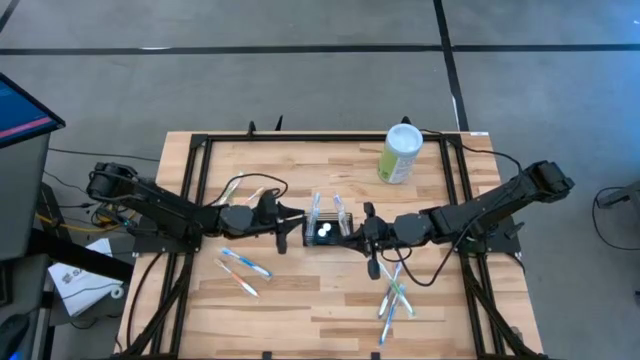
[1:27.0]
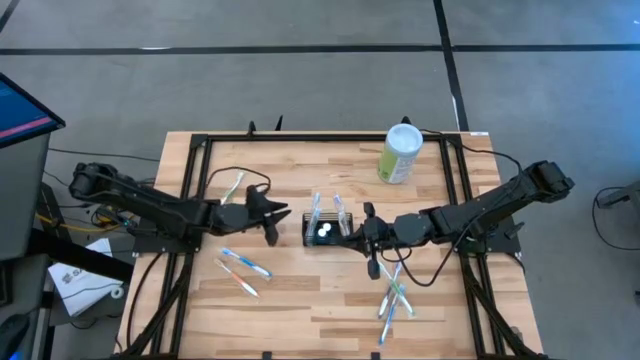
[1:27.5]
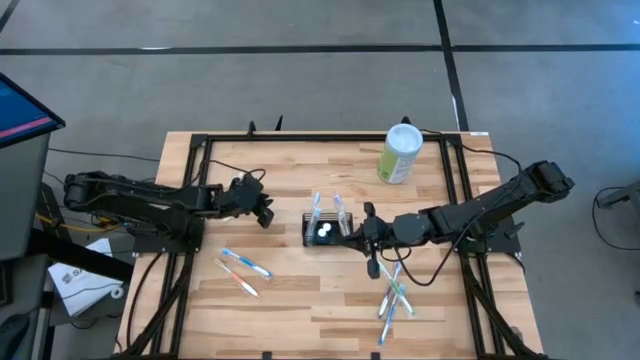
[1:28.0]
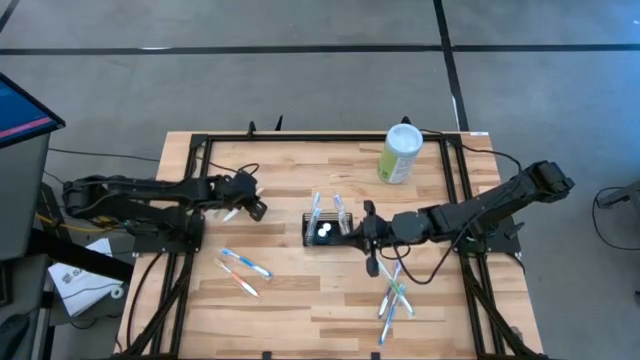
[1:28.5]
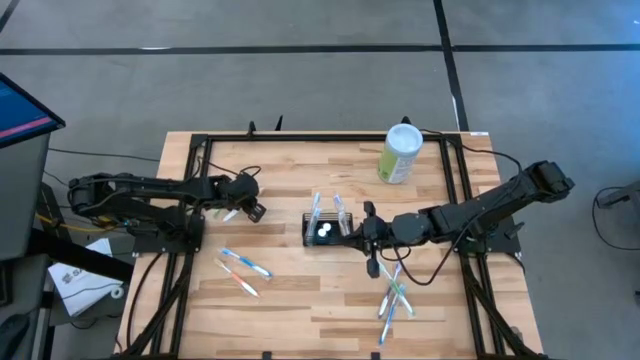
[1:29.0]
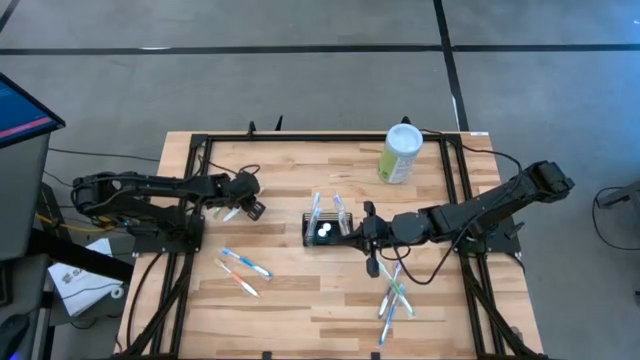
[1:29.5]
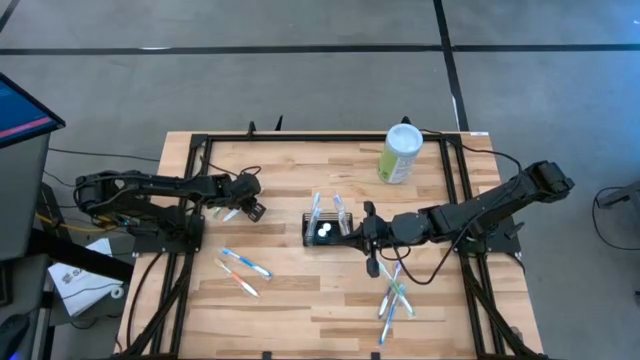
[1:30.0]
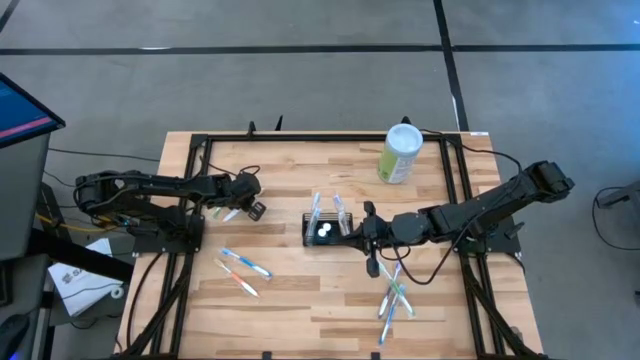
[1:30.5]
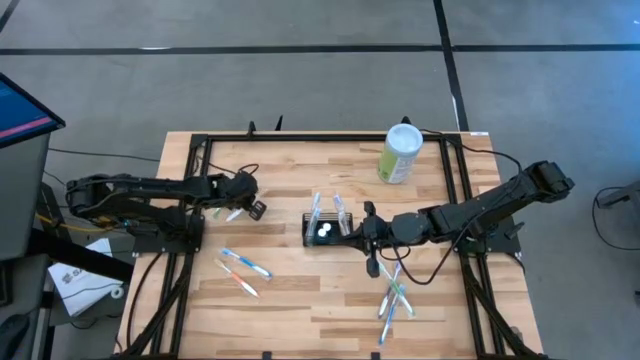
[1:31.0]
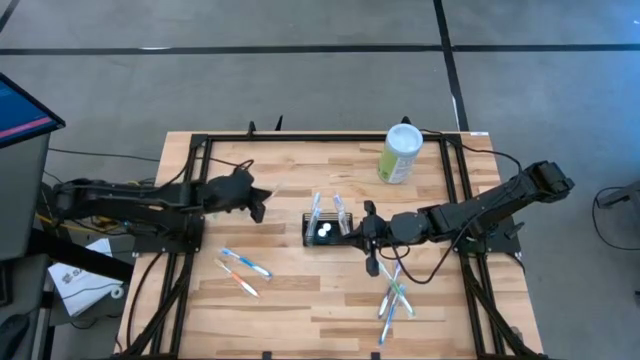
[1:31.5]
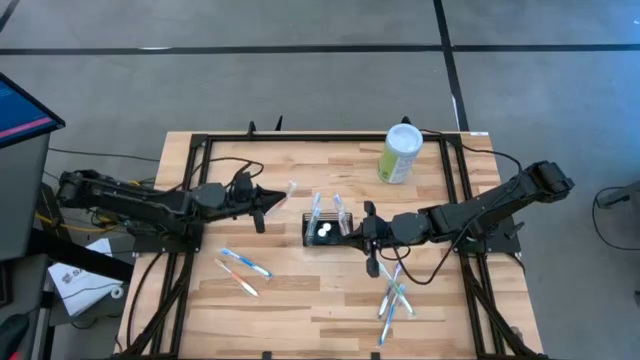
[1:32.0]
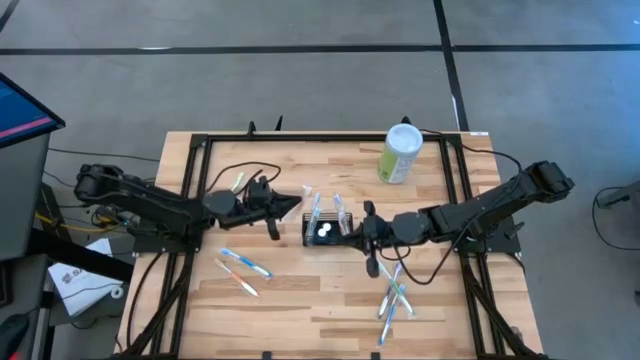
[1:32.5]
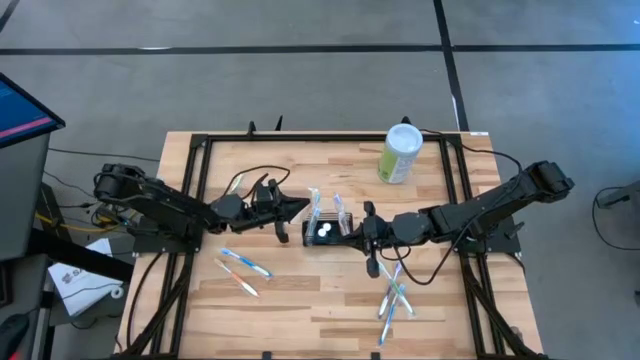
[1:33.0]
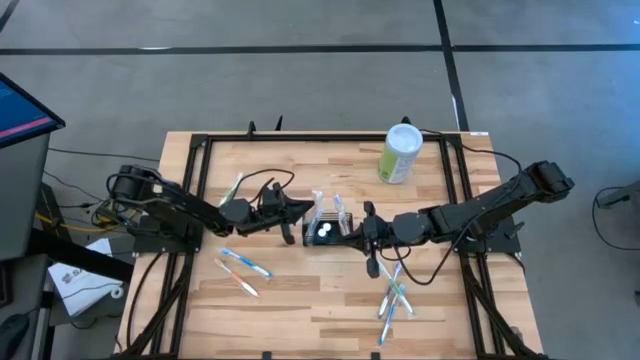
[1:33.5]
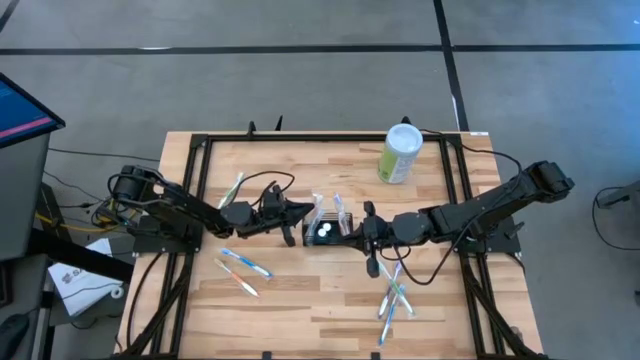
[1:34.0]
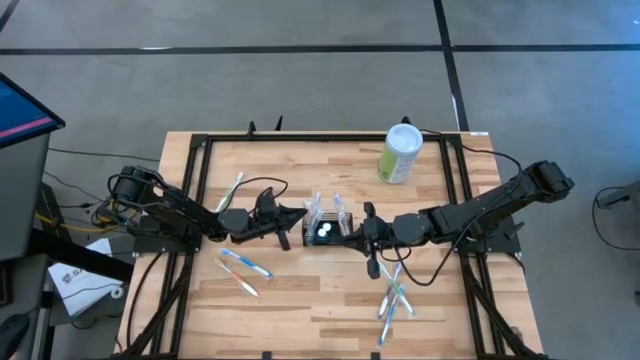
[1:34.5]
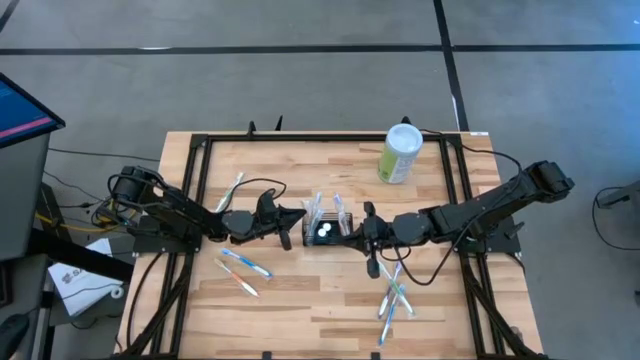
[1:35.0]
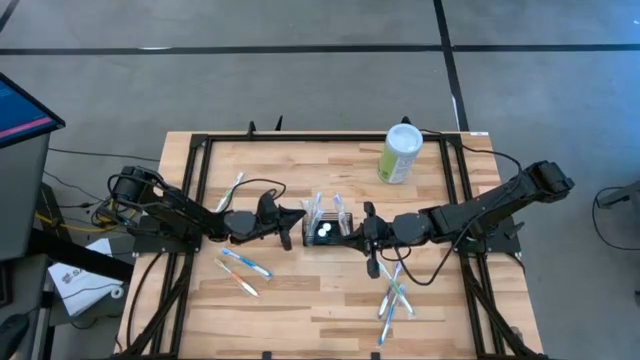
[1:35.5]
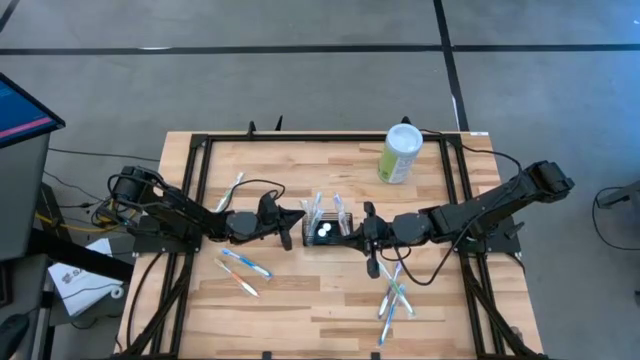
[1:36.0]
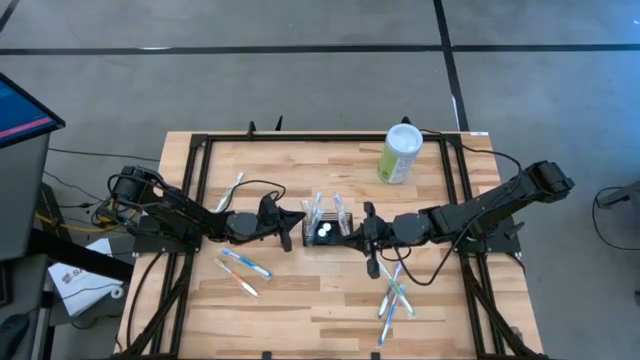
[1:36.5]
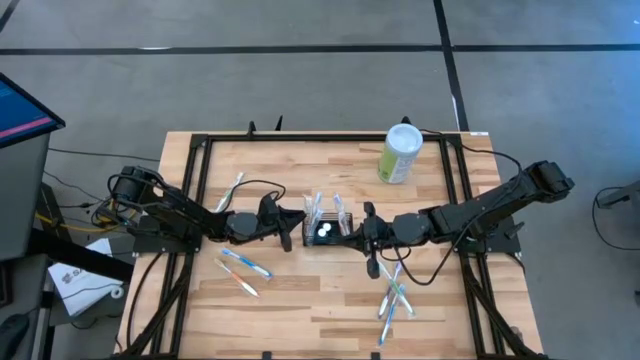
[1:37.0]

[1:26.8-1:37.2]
Task: Pick & Place toothbrushing station
Put the top orange toothbrush into the left compartment of the organizer

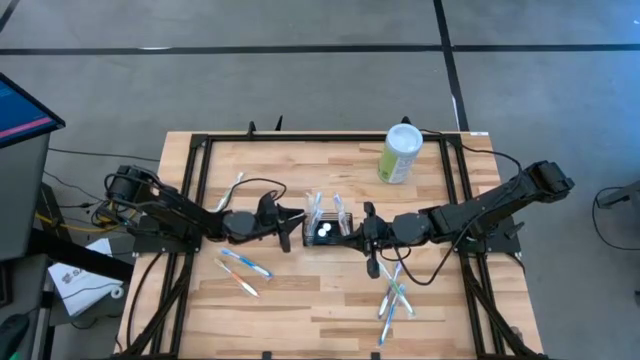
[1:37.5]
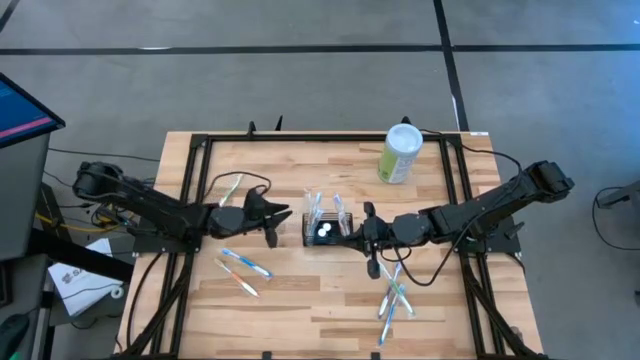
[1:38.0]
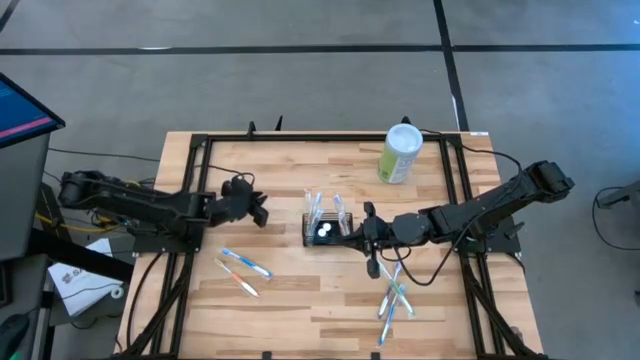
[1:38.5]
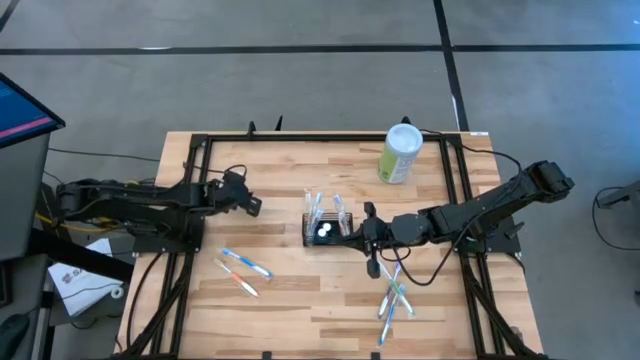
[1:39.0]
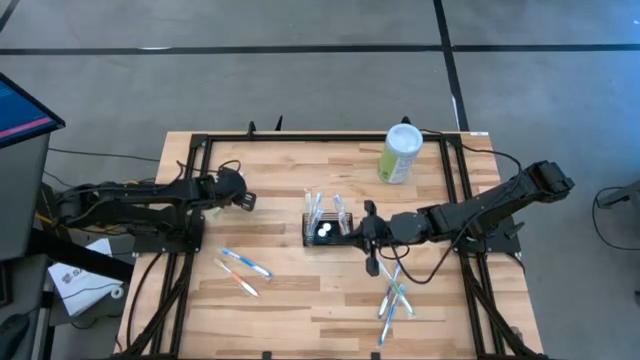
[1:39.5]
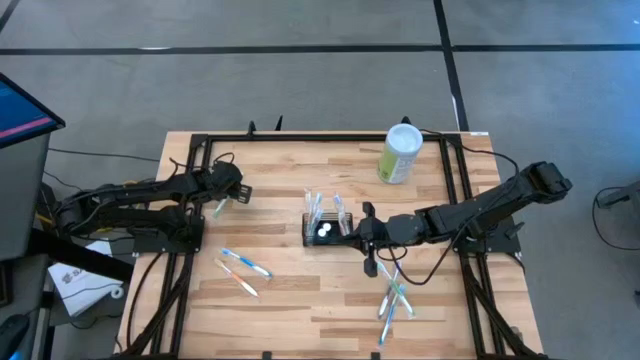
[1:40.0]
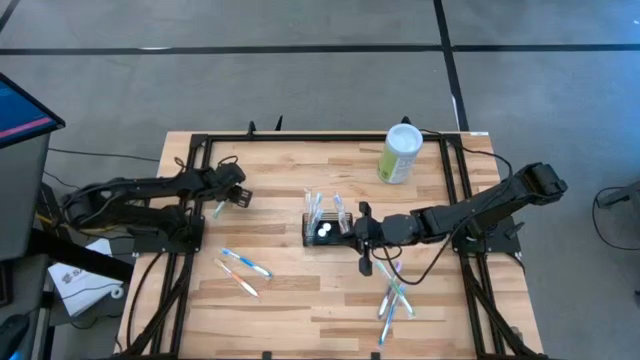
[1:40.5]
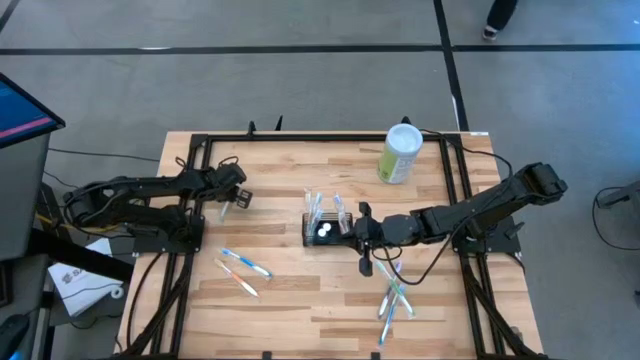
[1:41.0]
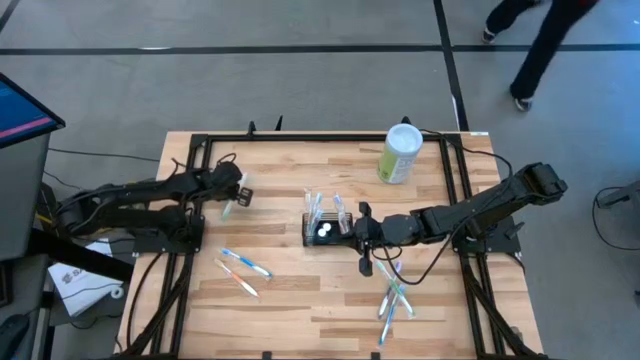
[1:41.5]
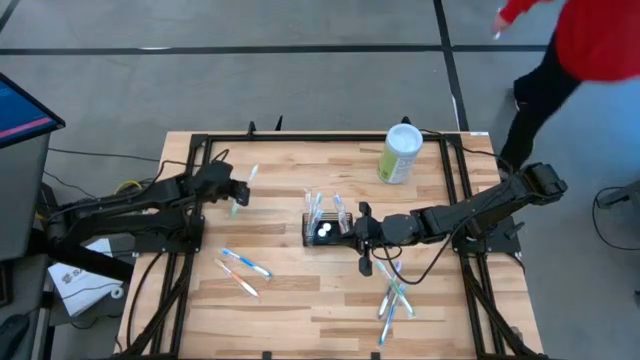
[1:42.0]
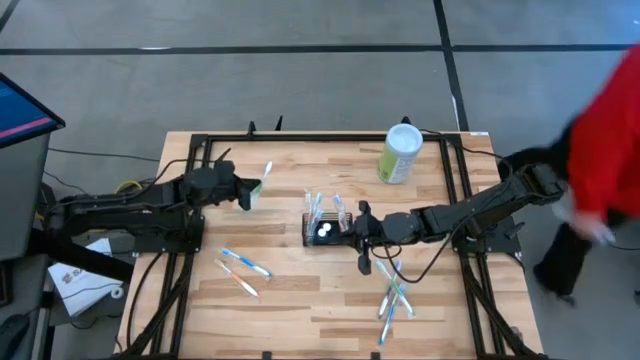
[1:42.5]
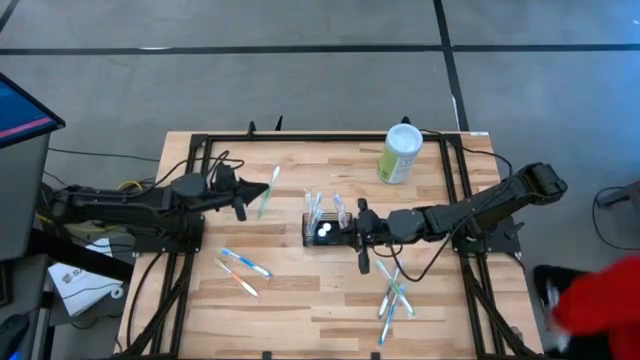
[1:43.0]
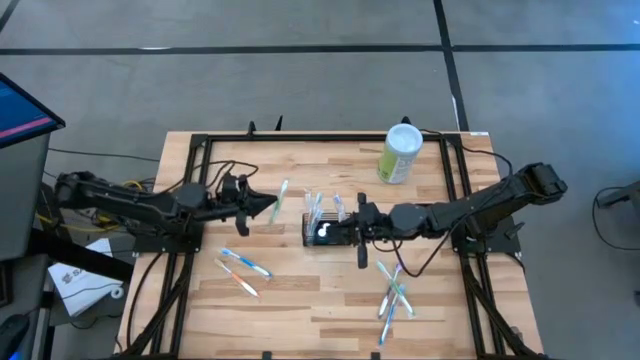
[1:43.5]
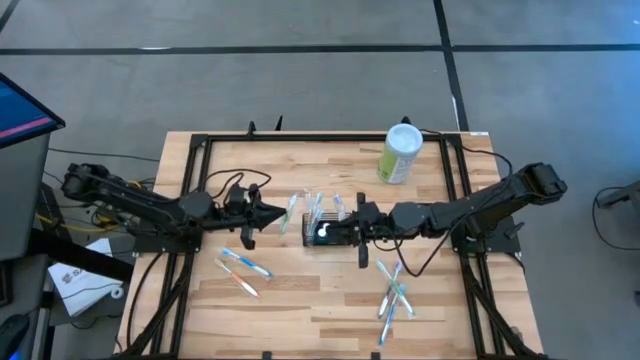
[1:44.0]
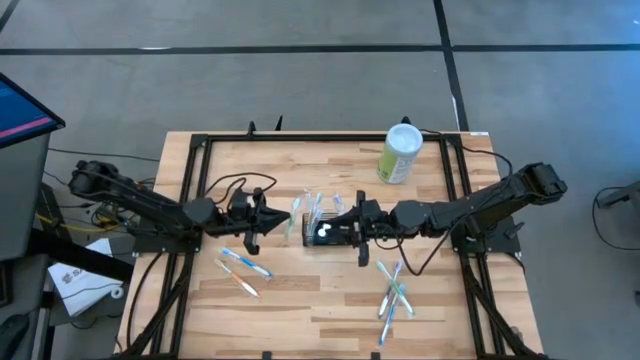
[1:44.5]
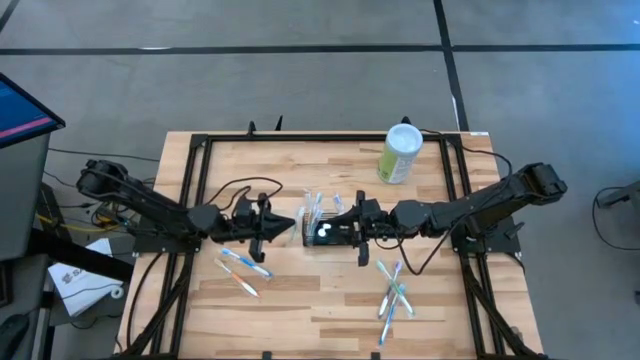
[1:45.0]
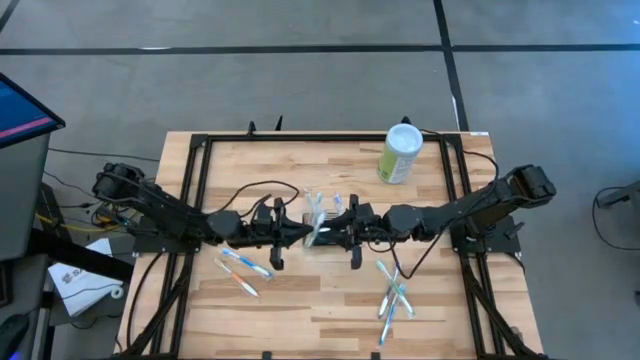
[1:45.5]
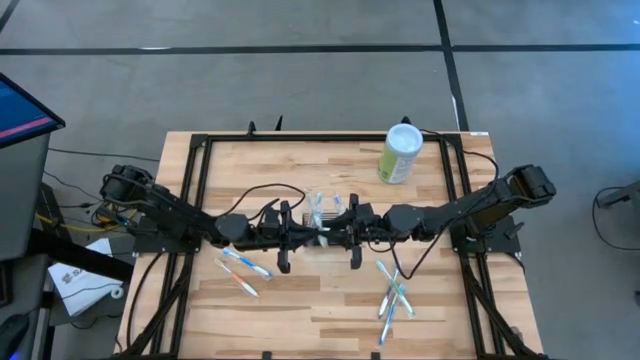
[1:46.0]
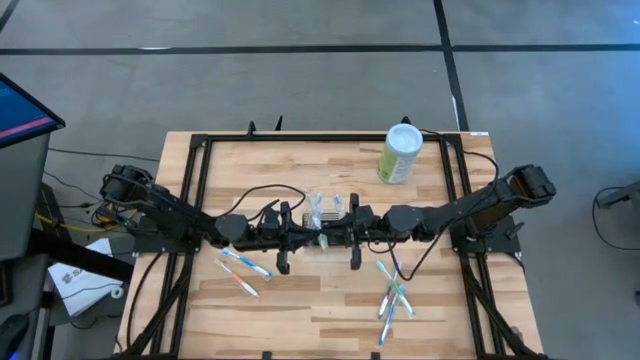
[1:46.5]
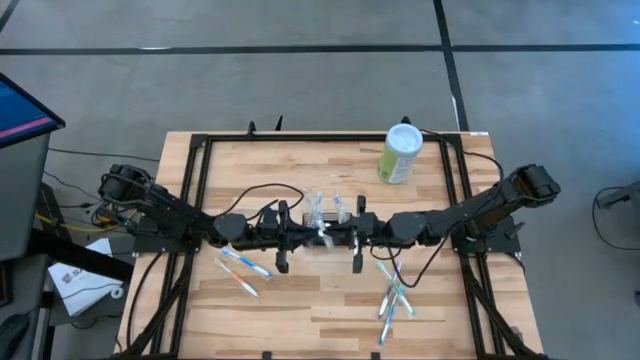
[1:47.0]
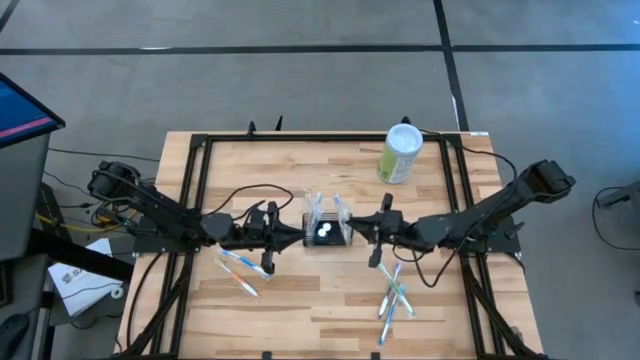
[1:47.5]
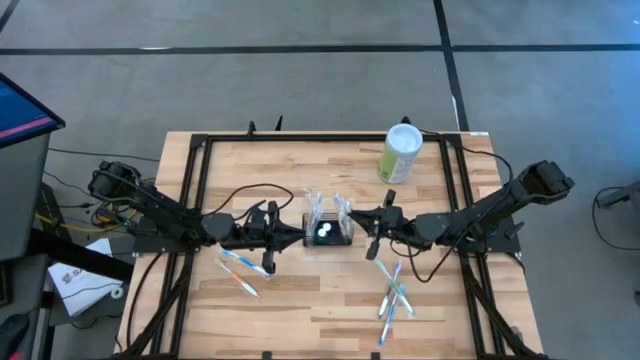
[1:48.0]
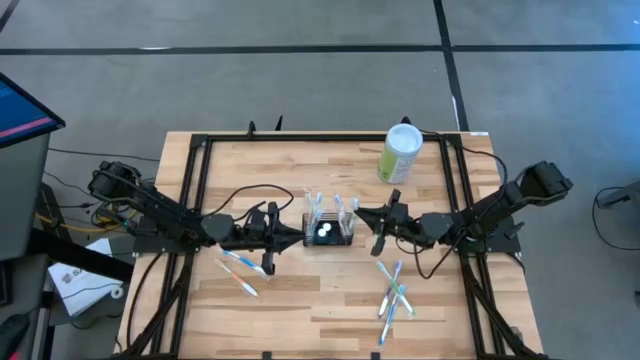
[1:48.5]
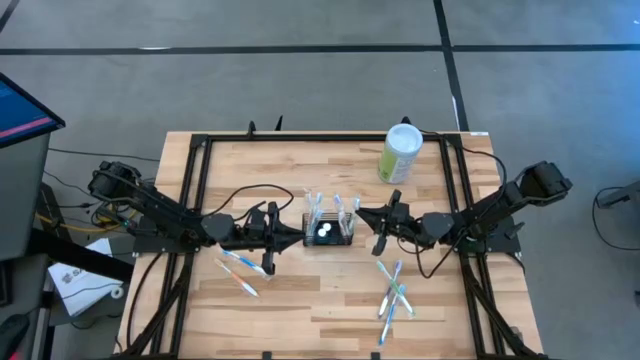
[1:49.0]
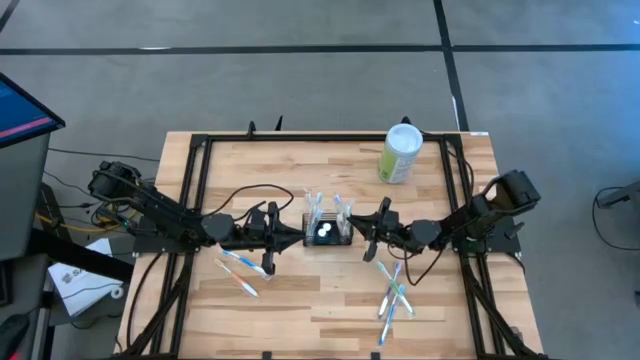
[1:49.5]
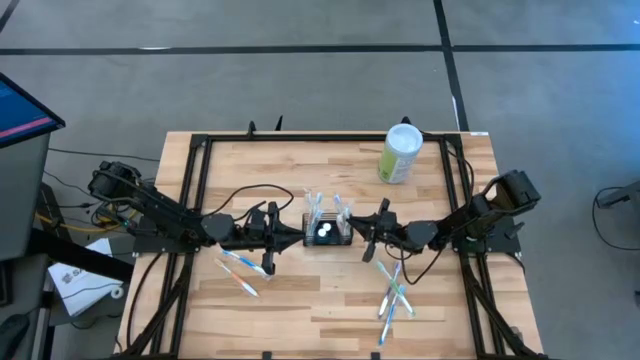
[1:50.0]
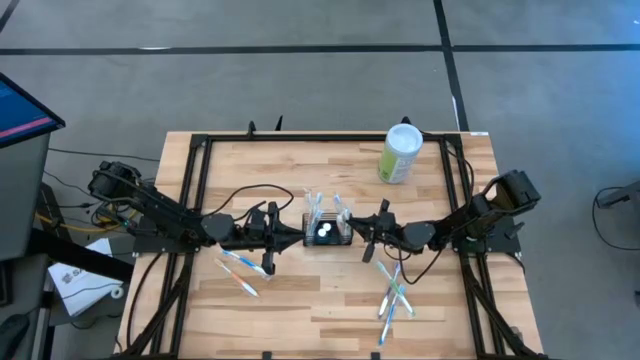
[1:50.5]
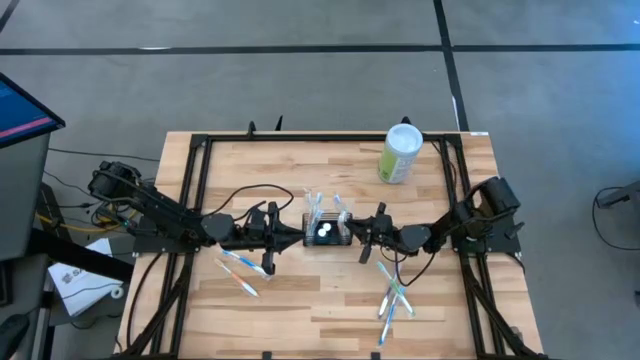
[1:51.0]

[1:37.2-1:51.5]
Put the left green toothbrush into the right compartment of the organizer
